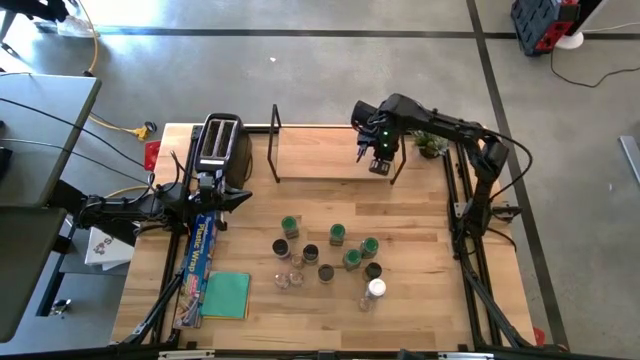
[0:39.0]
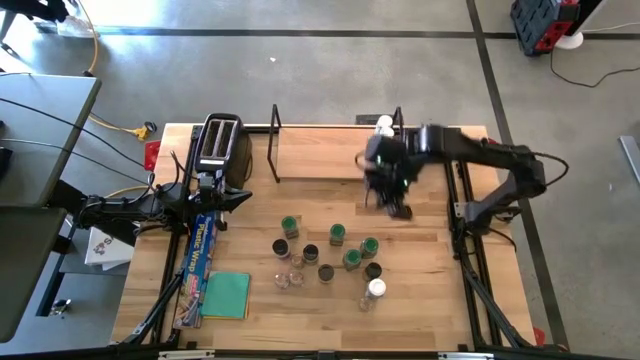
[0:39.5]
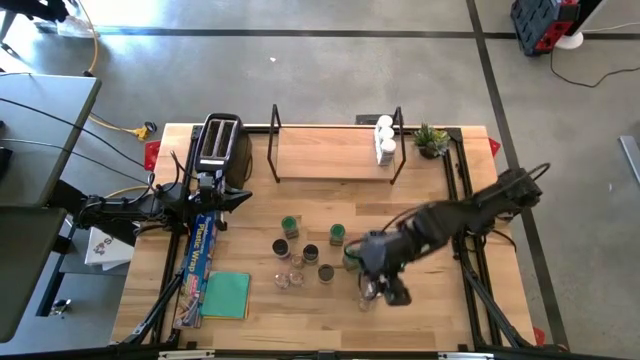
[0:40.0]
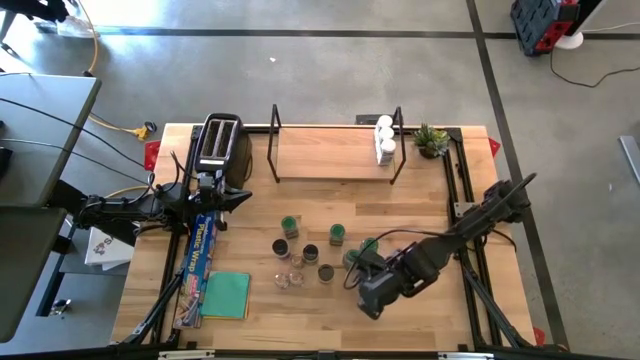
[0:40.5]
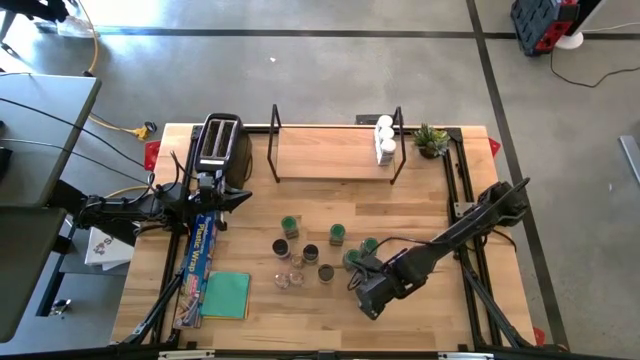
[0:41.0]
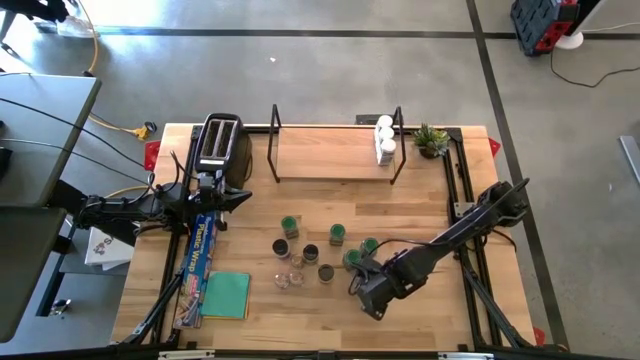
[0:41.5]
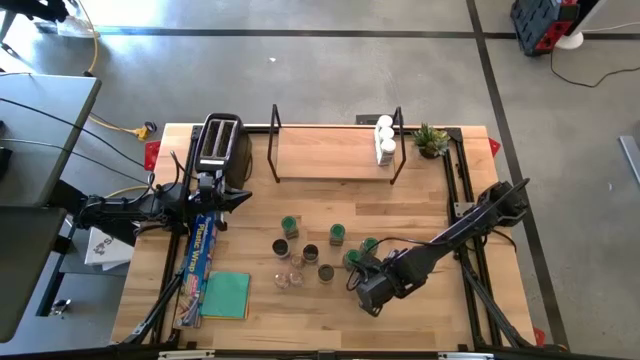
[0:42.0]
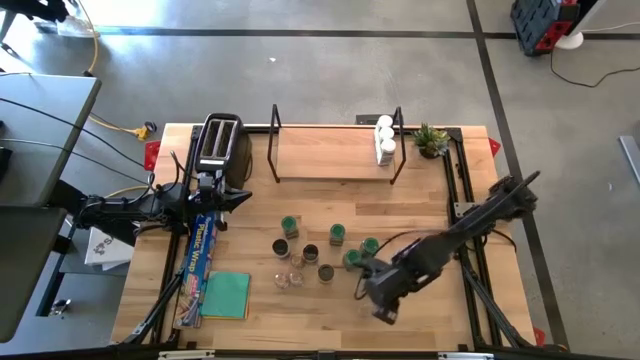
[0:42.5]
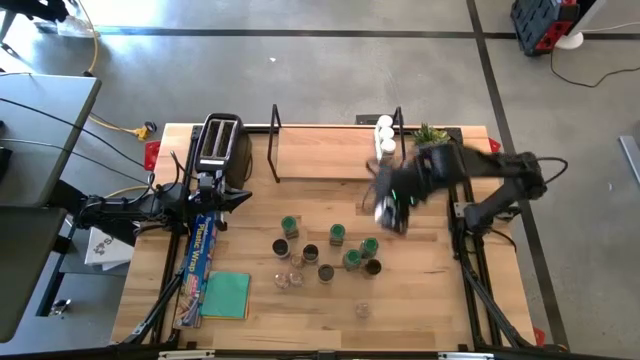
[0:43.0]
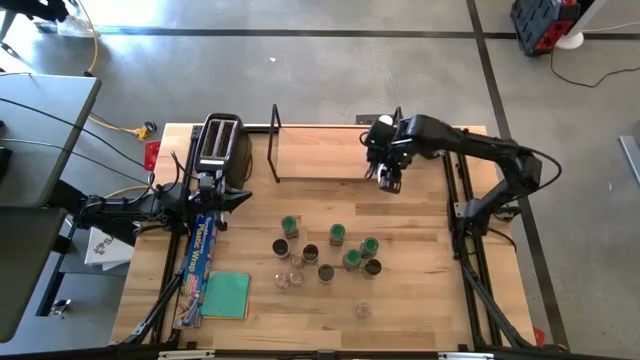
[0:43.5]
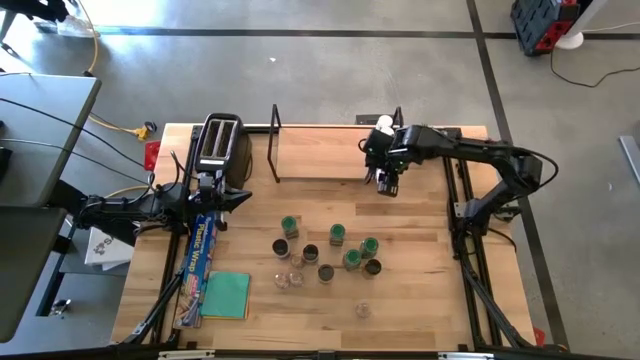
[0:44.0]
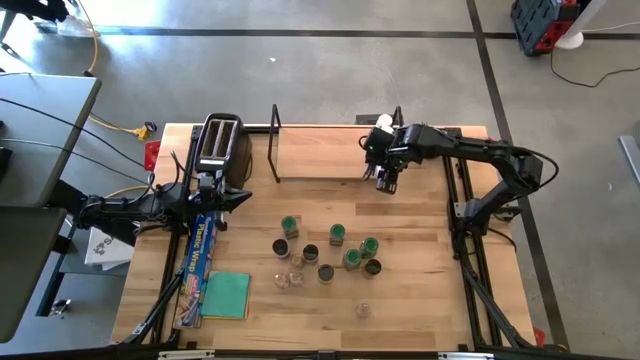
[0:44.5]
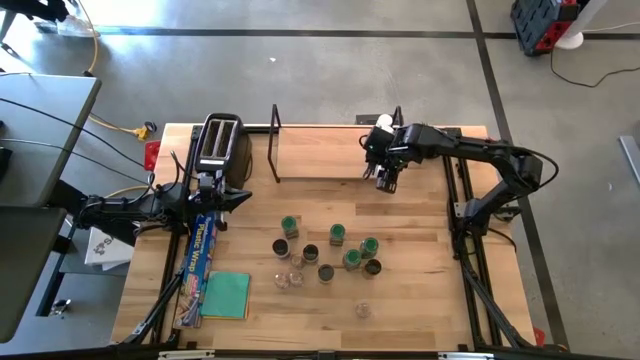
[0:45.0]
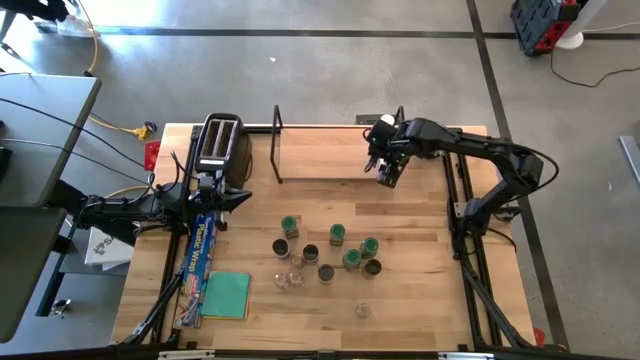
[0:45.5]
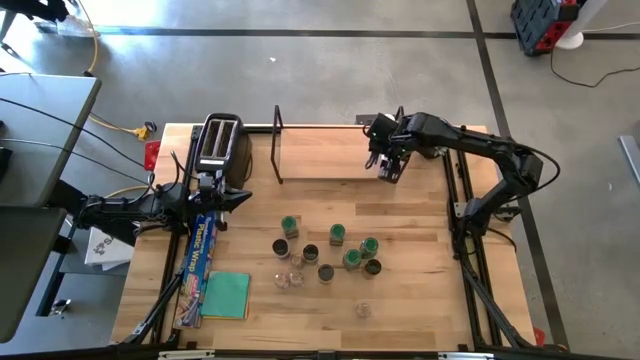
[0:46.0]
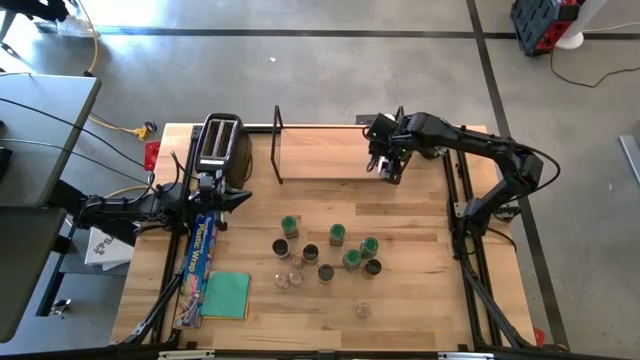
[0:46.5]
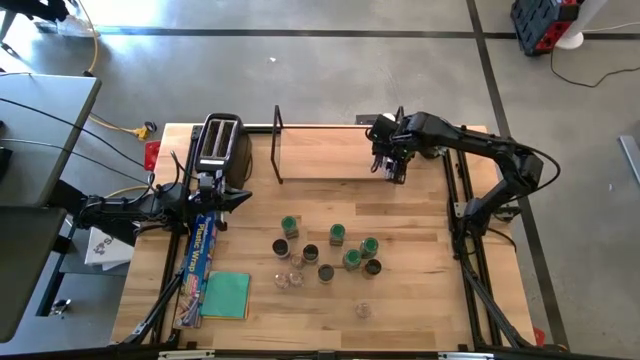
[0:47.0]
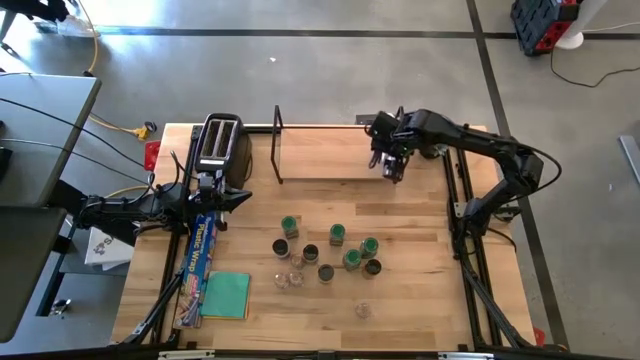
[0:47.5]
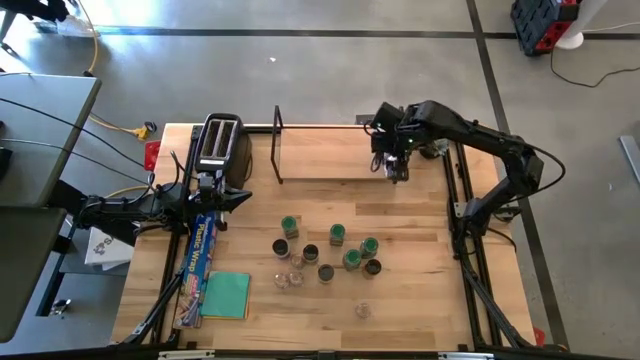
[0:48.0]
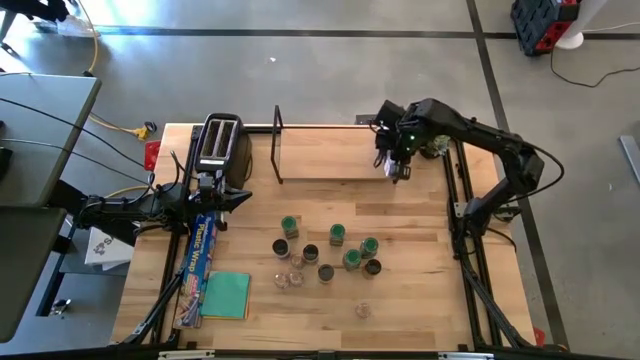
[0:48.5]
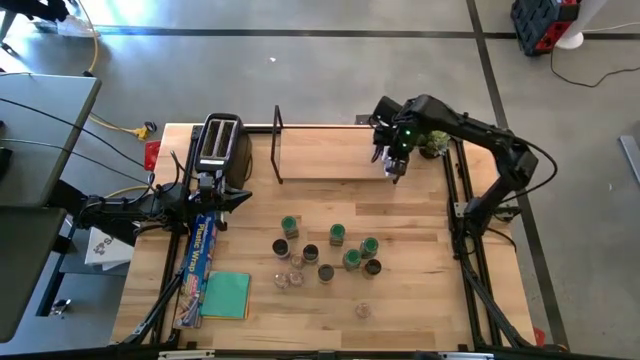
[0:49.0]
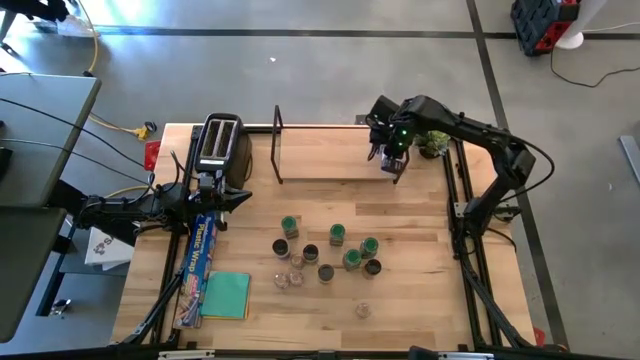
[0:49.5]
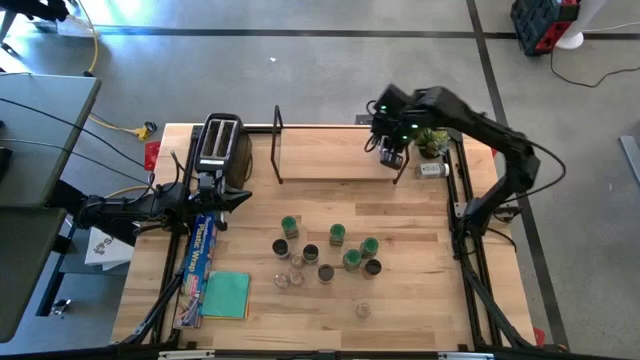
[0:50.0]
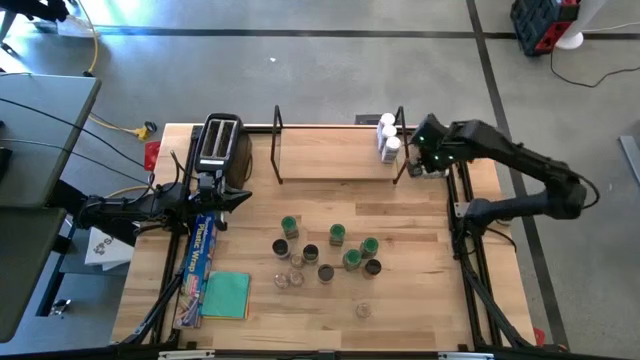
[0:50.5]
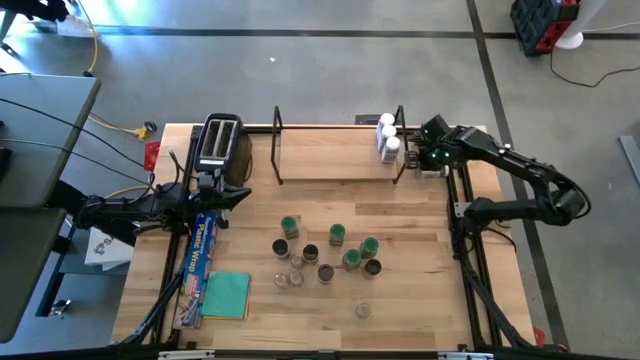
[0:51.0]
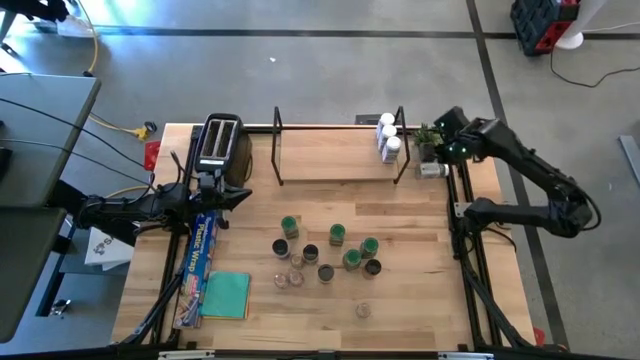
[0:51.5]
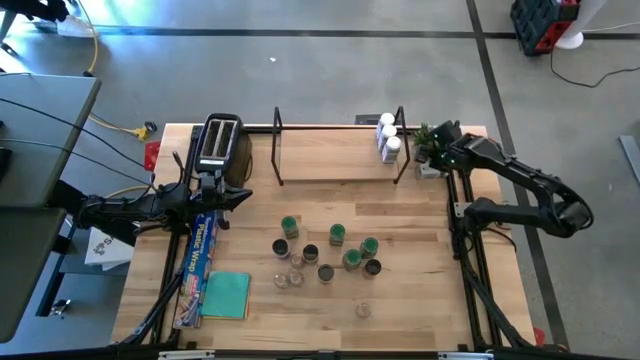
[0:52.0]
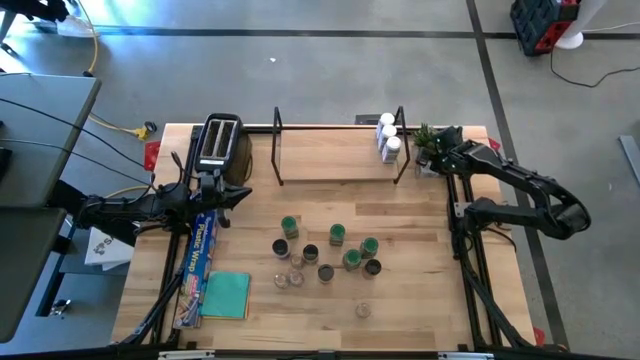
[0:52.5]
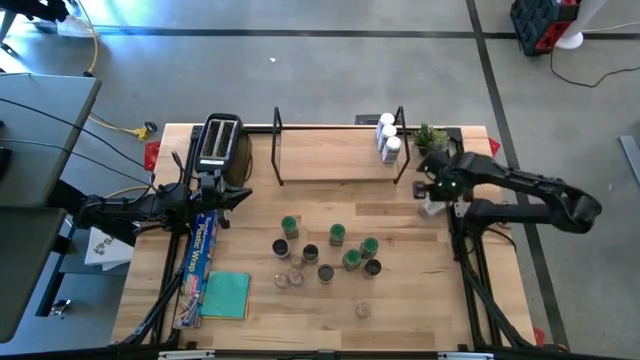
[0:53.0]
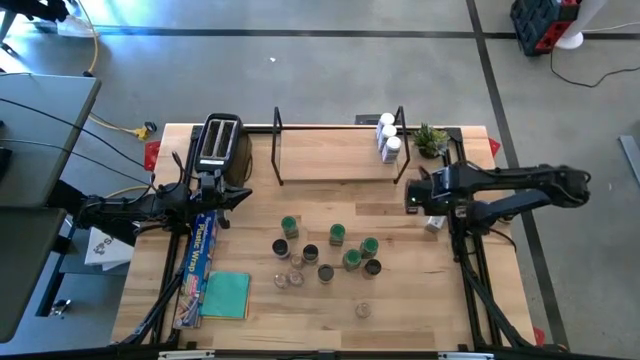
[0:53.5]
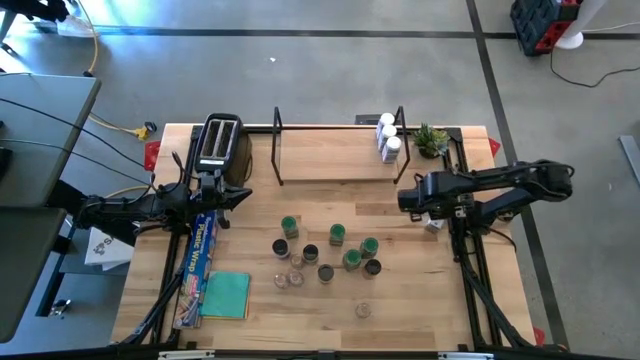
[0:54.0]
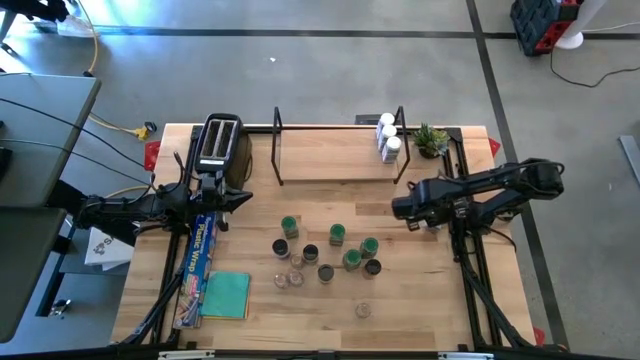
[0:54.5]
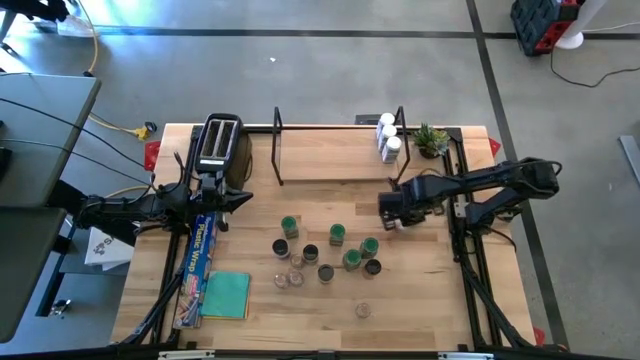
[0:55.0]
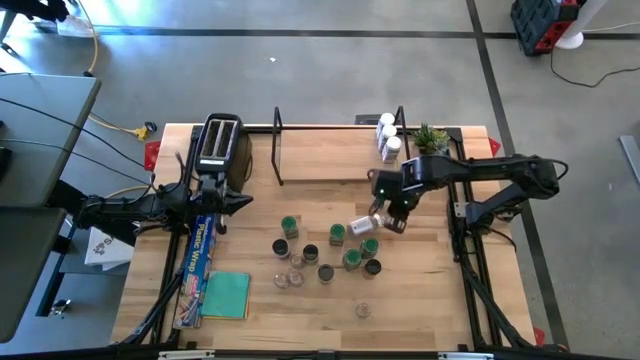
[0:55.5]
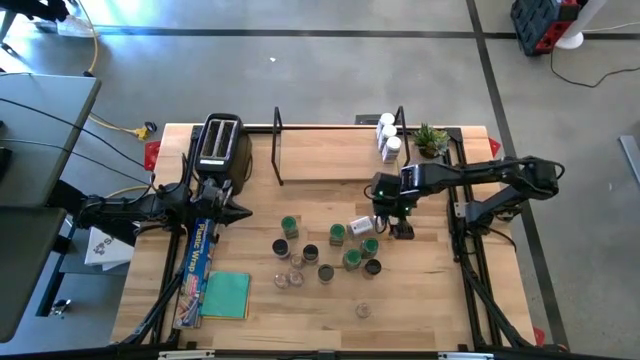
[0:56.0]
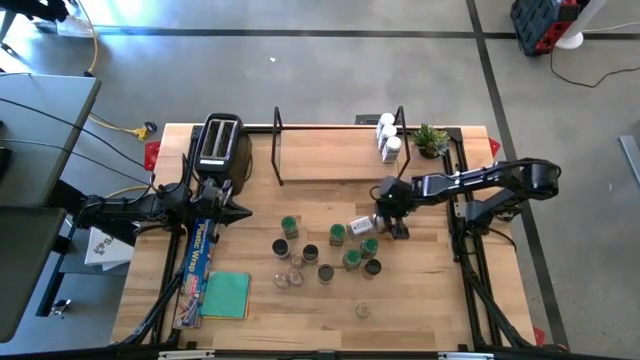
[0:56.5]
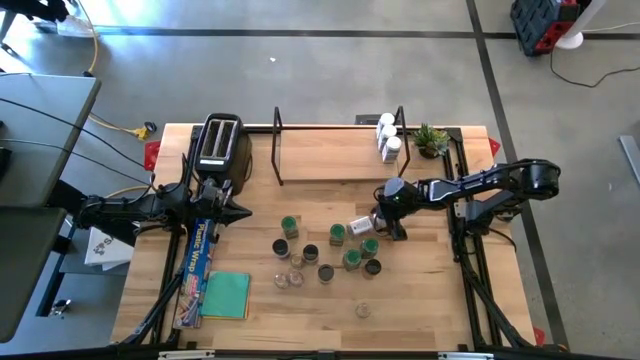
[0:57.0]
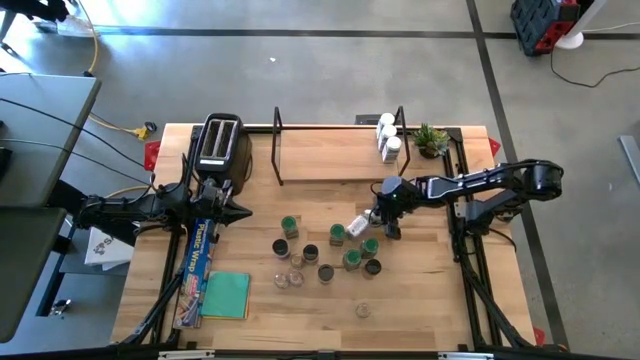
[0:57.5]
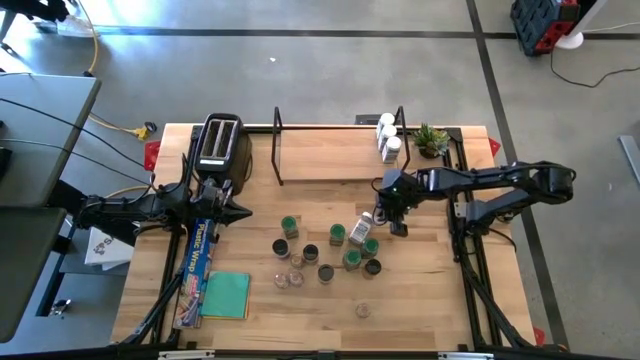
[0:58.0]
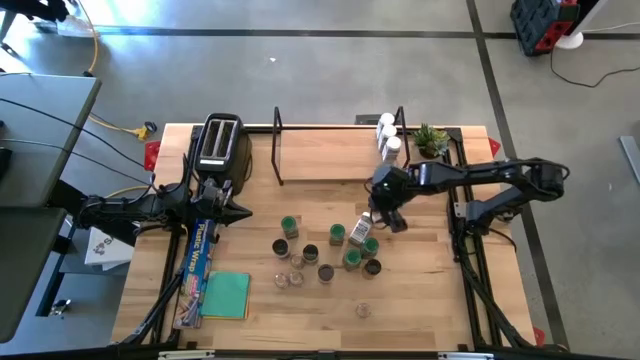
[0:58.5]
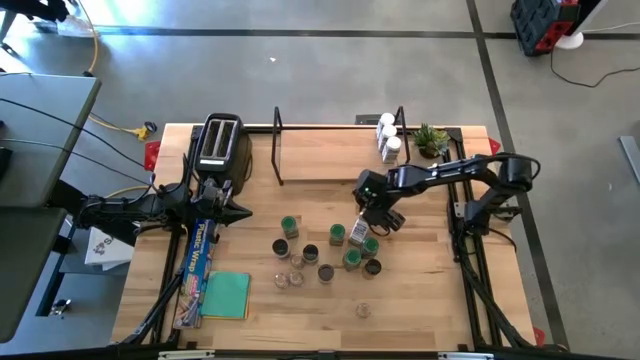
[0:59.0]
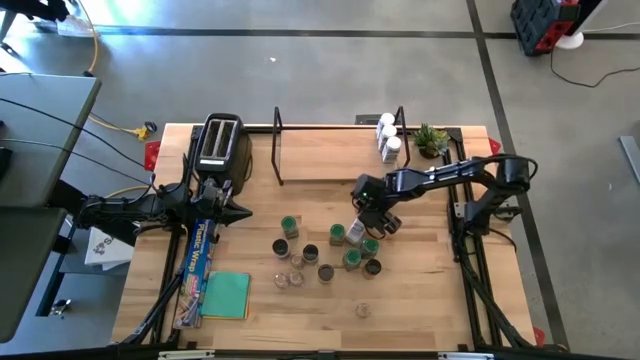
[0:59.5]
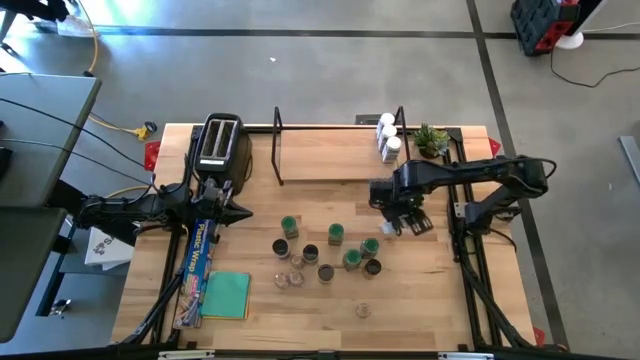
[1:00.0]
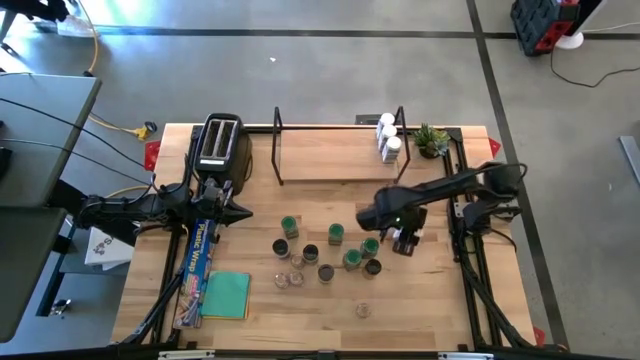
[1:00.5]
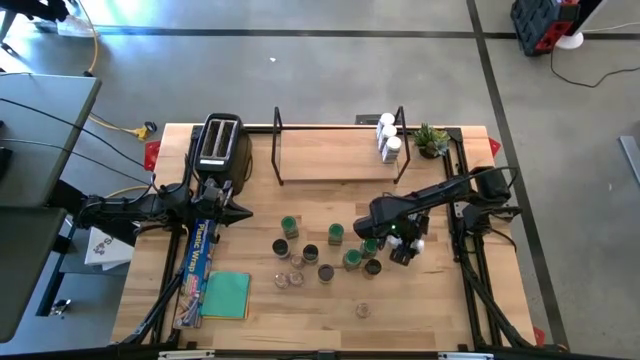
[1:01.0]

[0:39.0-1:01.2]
Task: Shelf spices
Put the white seasoning bottle on the shelf and align it with the other white seasoning bottles
